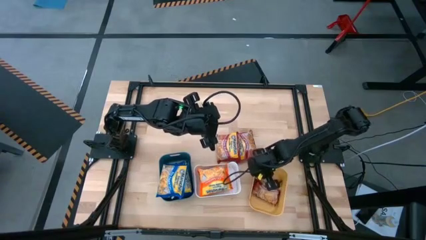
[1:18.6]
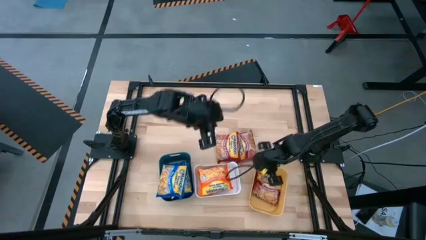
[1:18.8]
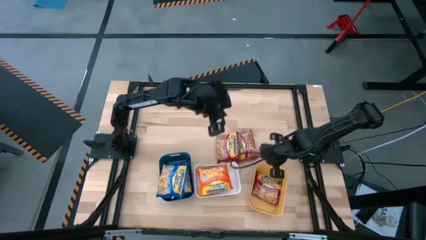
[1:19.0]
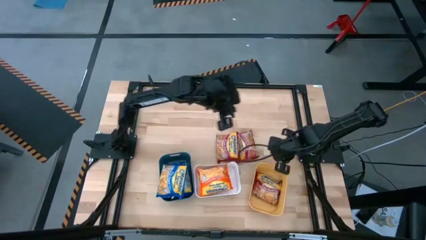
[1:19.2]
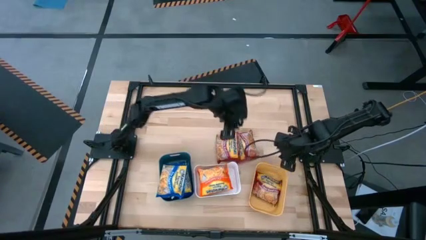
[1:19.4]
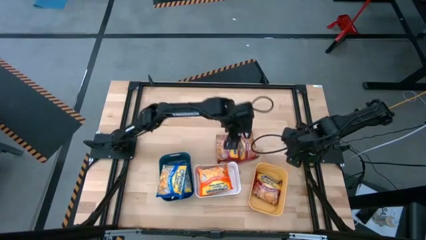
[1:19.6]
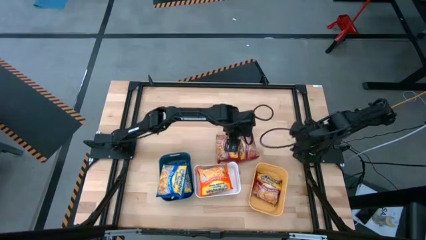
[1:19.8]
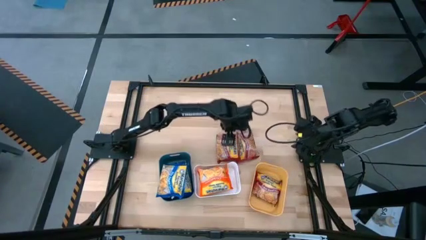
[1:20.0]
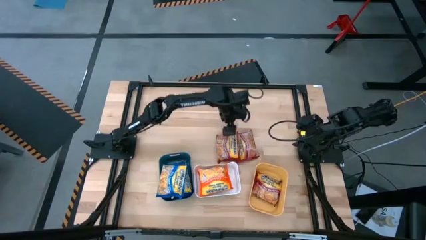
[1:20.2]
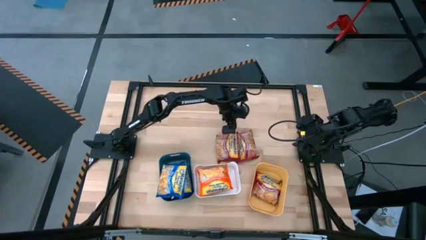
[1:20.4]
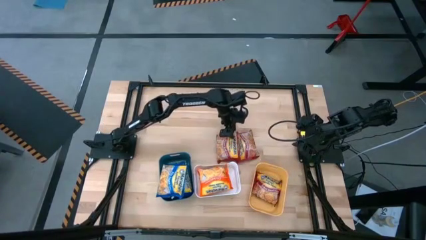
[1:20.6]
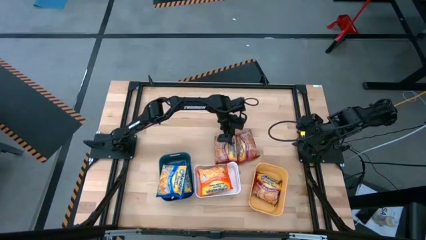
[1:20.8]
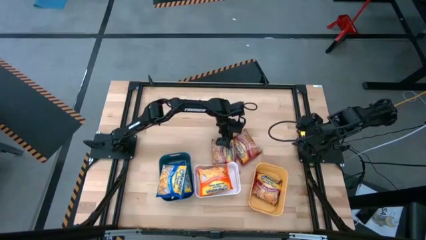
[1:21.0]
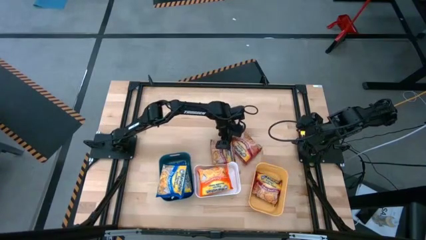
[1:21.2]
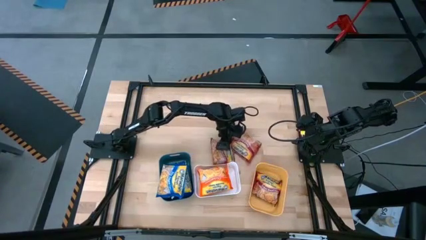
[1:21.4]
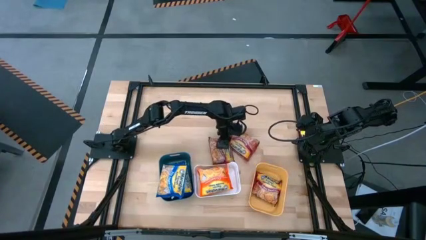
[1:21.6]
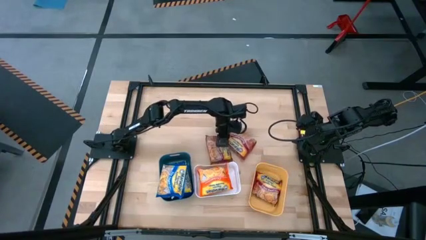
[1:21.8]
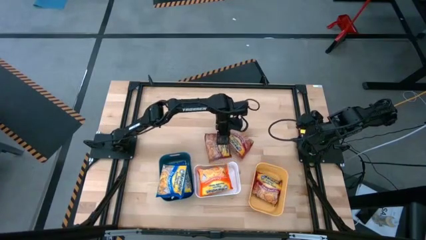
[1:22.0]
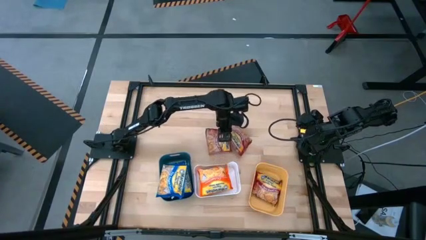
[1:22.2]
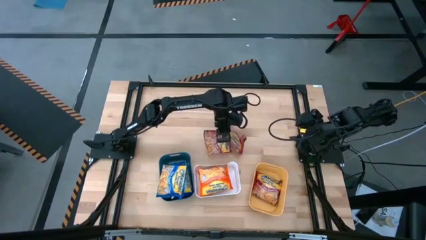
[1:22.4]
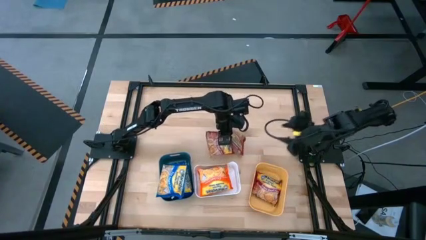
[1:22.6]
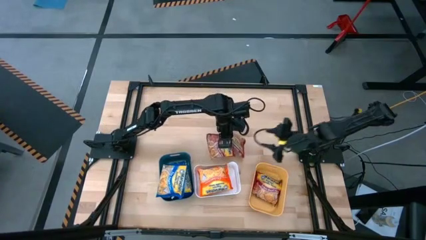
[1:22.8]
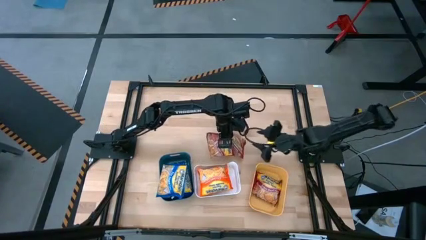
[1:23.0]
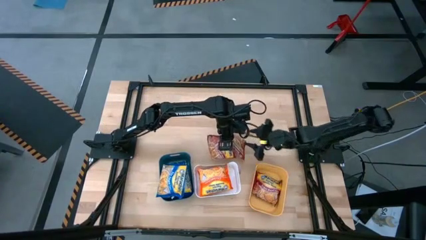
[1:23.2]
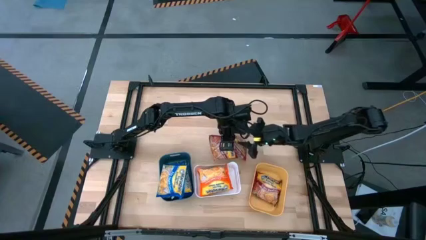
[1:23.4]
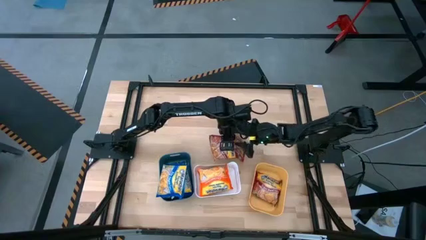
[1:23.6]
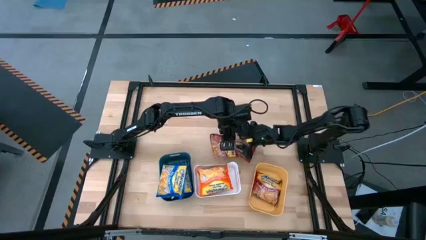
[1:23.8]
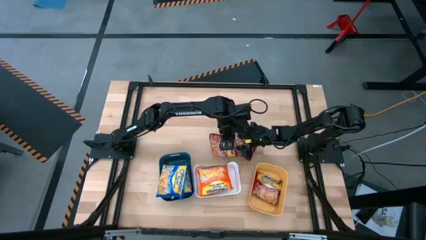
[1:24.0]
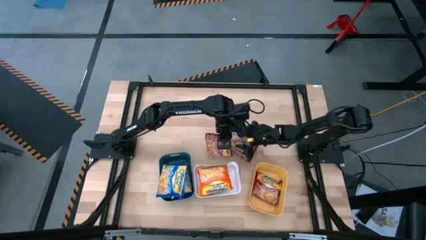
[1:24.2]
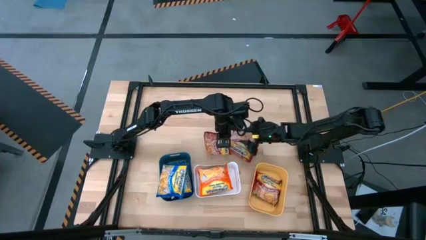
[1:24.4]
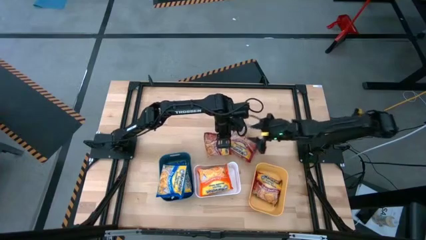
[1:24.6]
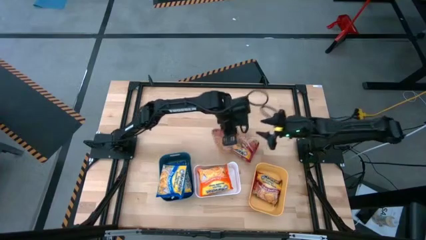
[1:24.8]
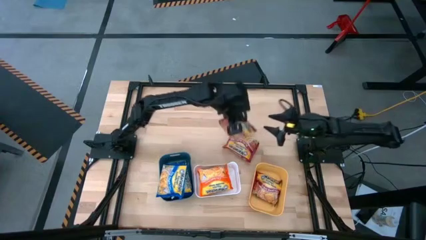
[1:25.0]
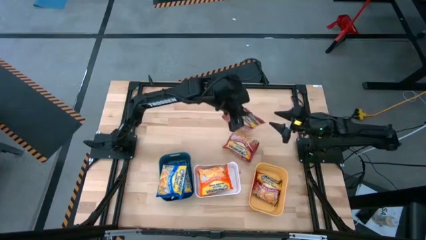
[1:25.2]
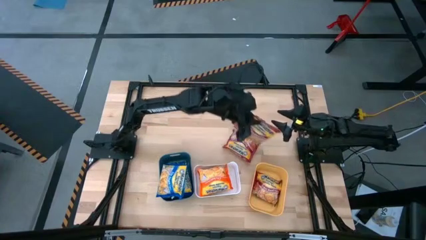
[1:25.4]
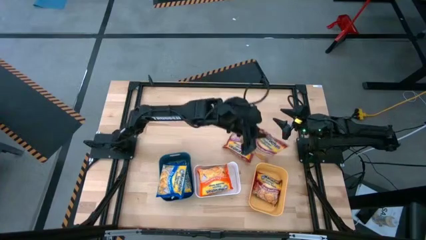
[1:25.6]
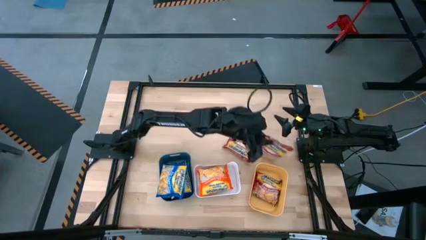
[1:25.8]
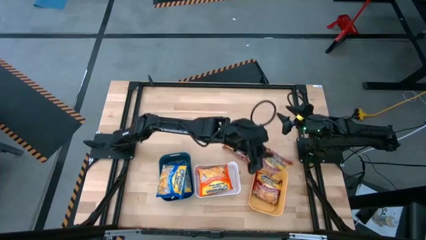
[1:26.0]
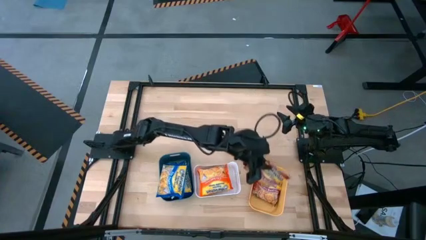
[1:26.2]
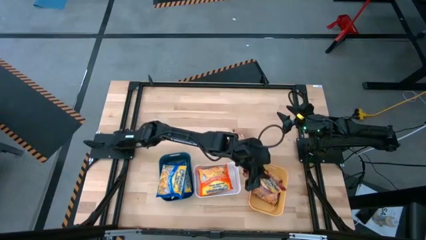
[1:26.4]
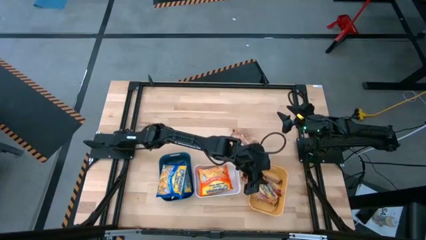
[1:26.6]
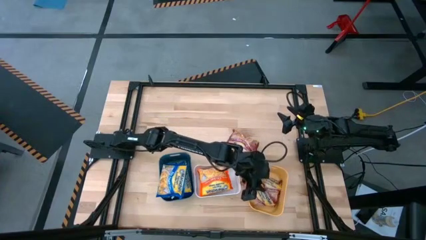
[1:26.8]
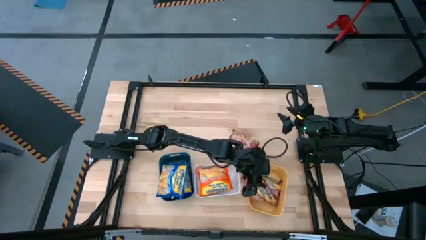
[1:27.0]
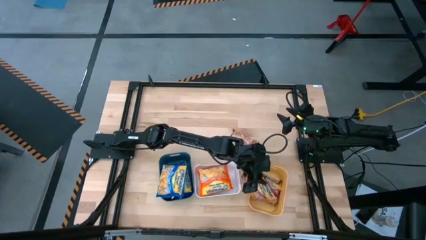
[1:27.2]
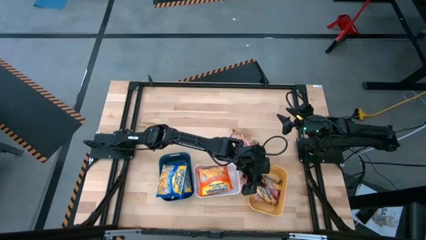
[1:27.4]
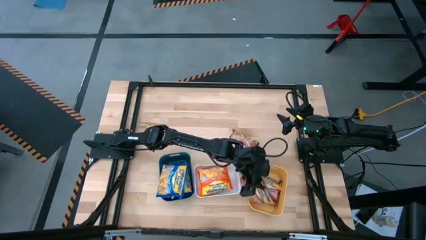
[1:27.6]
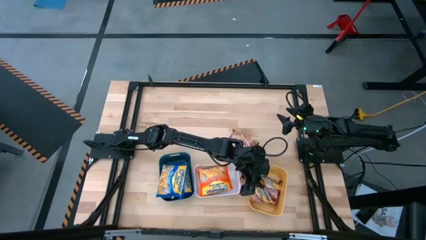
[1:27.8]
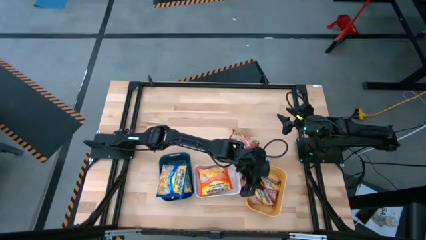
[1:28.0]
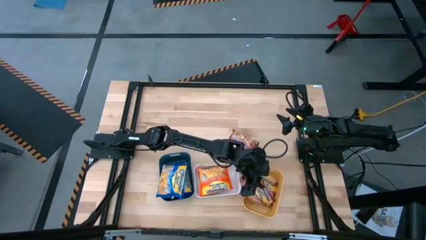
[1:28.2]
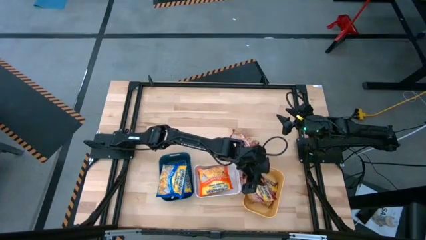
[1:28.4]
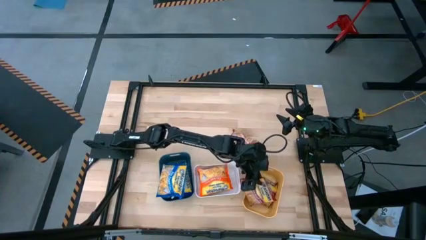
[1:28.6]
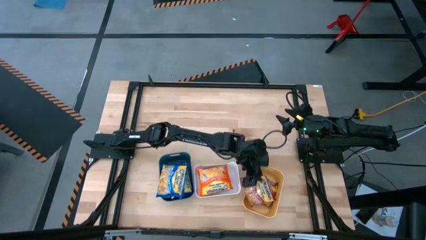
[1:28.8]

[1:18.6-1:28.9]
Task: Sort Maruchan noodles
Put the left red noodle pack into the yellow bin

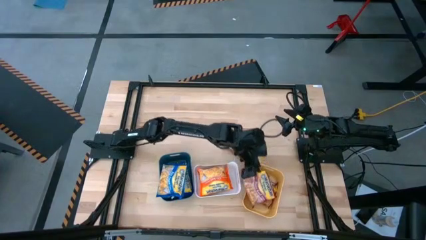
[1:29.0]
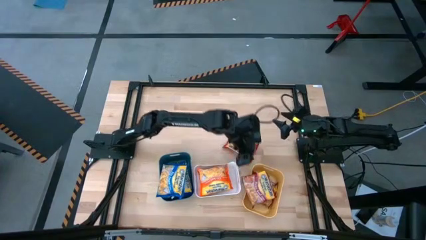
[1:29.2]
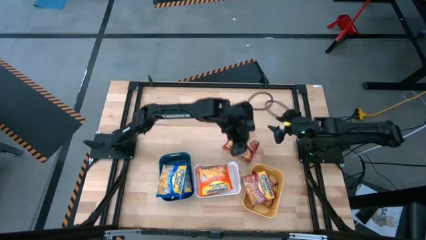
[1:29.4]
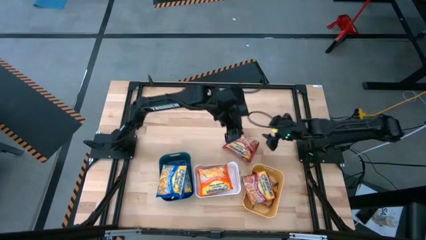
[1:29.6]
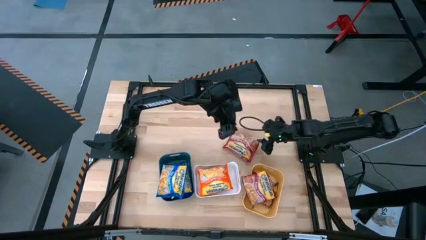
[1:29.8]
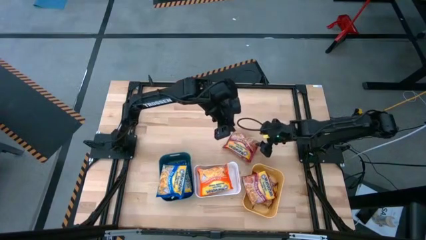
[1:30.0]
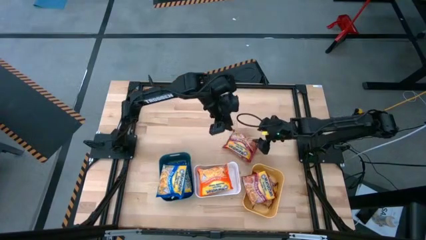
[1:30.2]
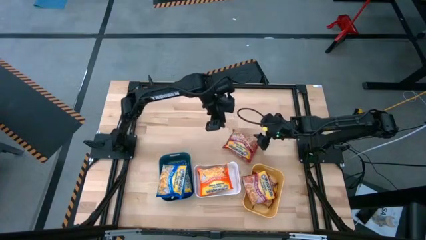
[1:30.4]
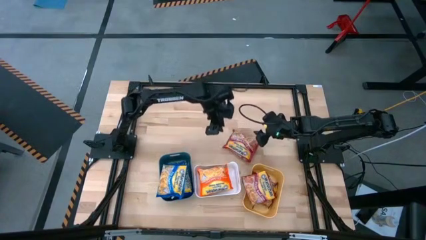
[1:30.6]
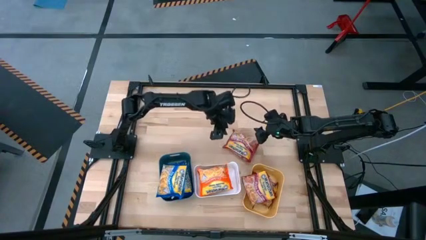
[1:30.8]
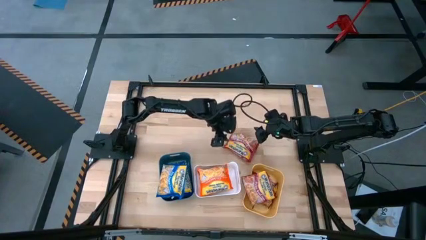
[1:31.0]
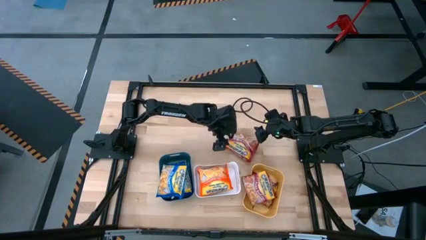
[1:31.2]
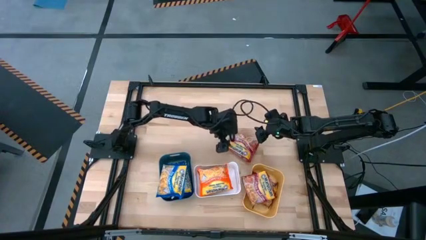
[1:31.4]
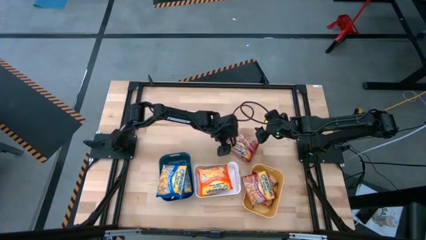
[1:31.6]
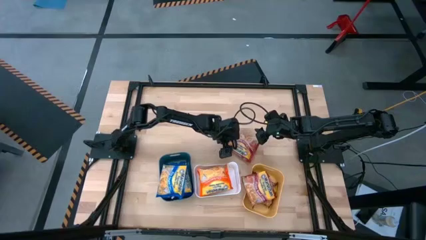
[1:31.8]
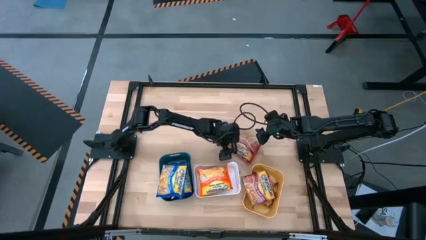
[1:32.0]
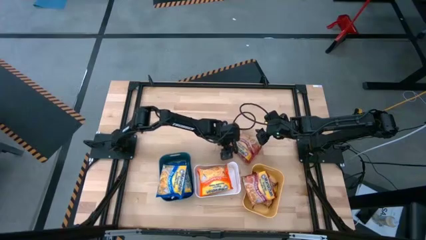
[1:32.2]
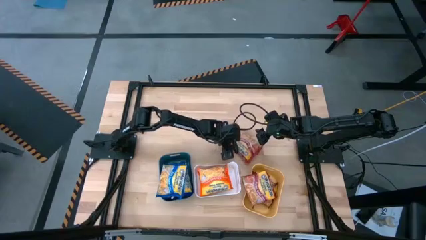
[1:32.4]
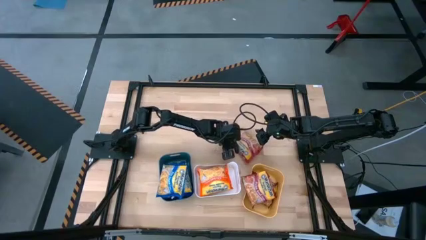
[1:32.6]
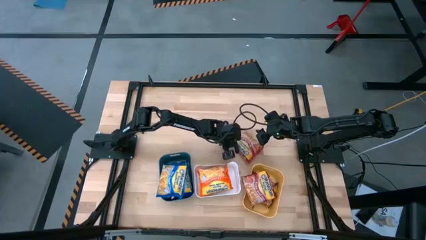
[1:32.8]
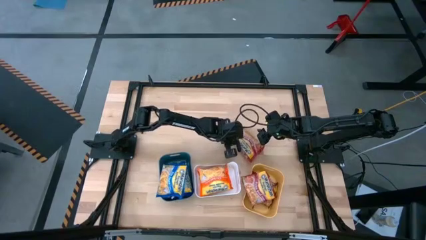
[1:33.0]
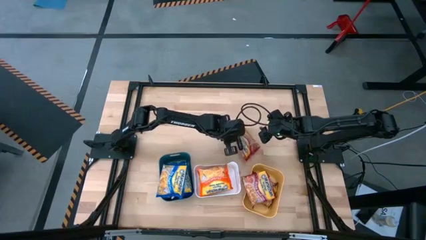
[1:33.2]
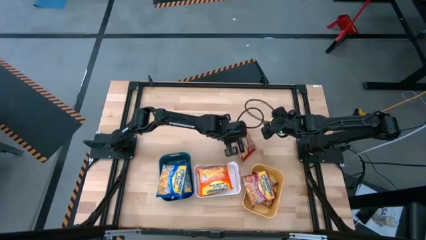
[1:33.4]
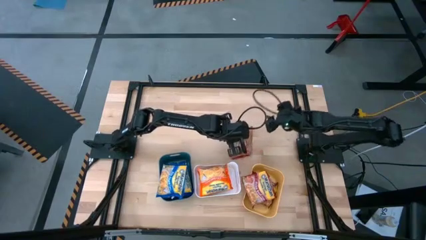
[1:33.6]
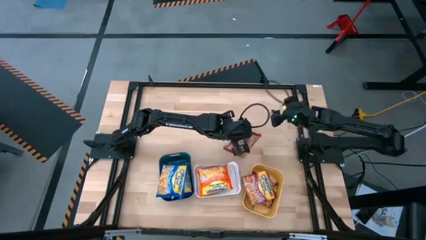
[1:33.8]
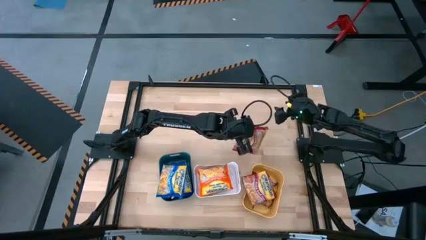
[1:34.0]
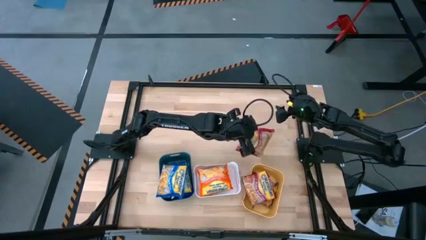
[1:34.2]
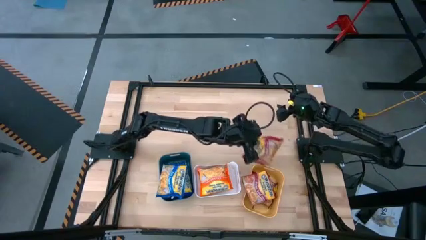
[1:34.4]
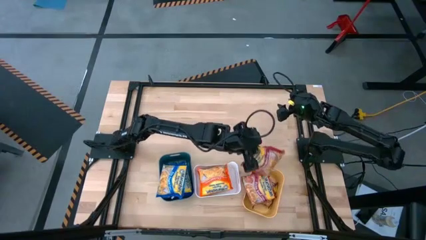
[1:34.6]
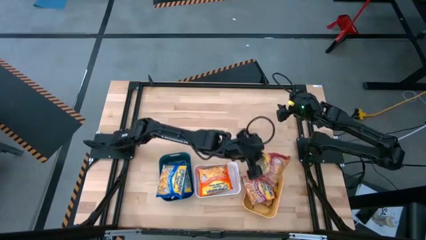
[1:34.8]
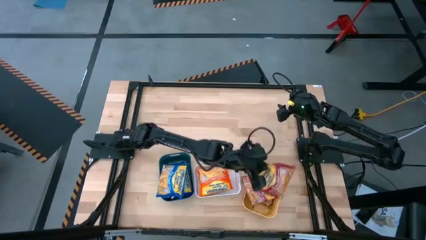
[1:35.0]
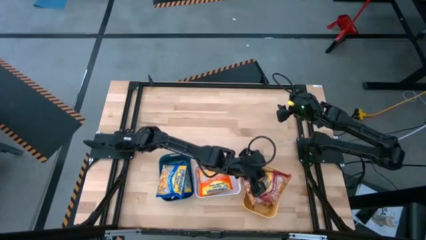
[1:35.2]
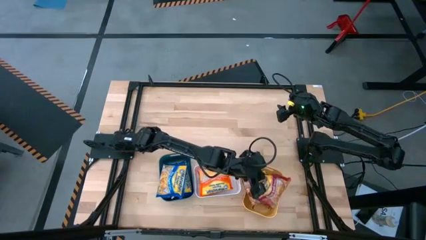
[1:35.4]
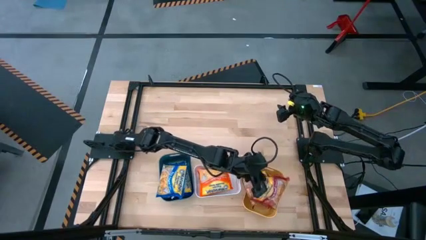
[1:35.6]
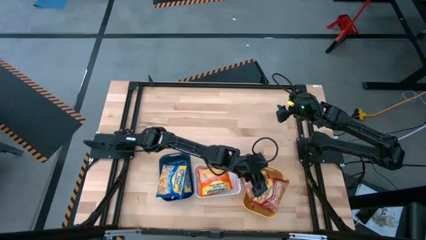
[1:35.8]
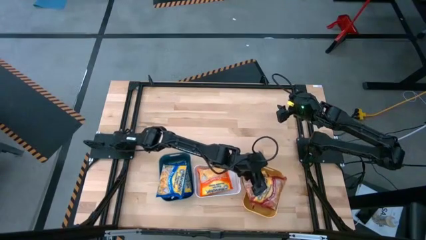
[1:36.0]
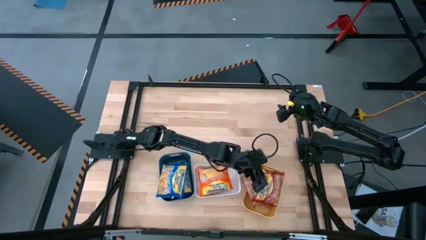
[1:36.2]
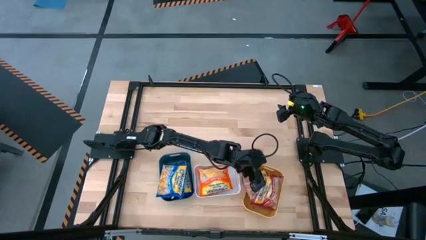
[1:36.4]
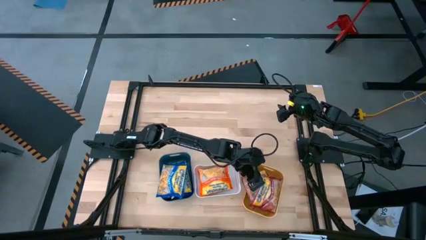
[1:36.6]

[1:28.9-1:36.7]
Put the red noodle pack into the yellow bin
